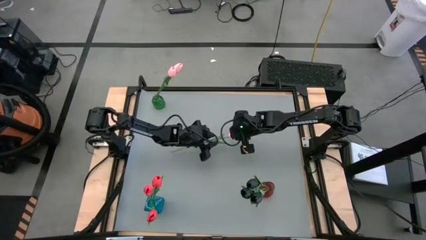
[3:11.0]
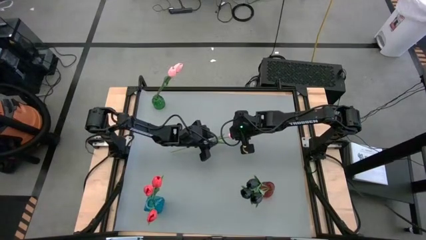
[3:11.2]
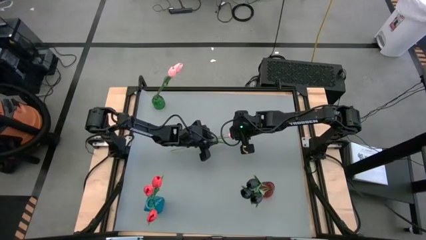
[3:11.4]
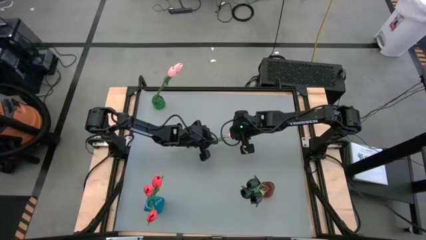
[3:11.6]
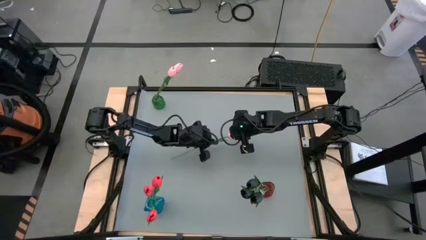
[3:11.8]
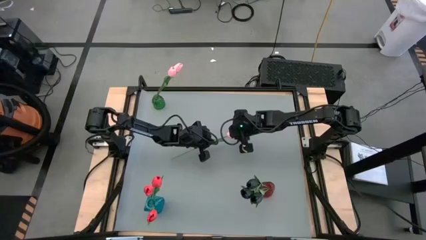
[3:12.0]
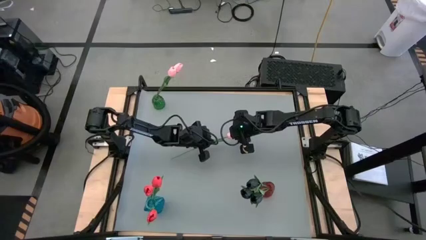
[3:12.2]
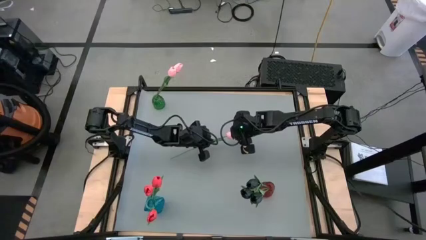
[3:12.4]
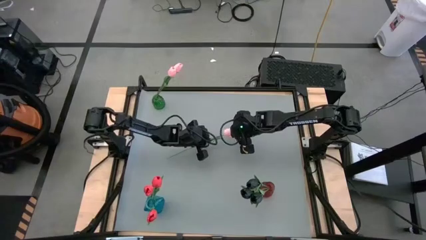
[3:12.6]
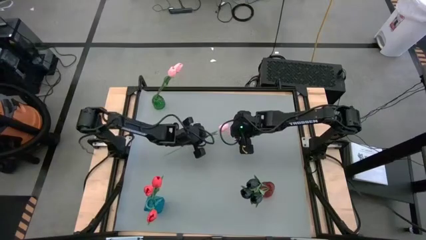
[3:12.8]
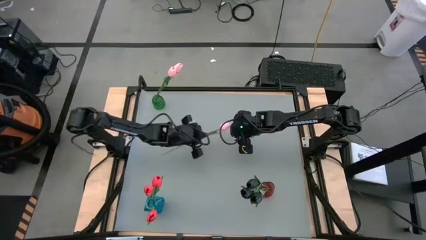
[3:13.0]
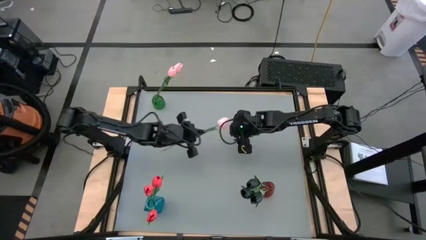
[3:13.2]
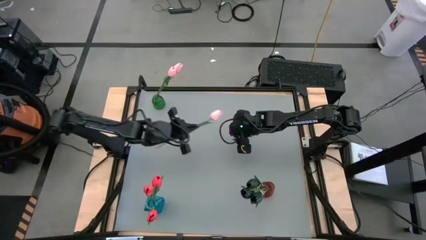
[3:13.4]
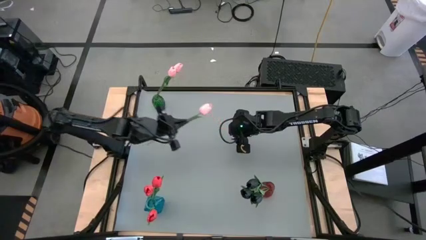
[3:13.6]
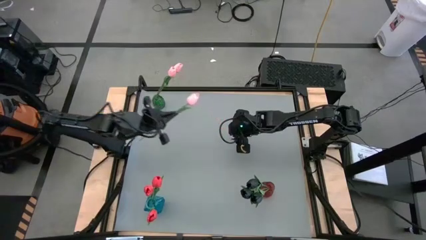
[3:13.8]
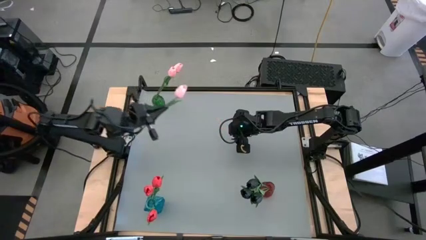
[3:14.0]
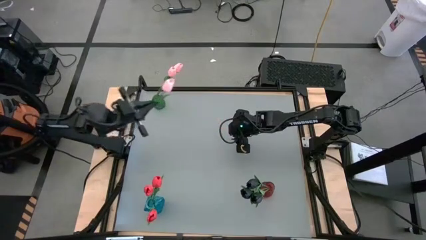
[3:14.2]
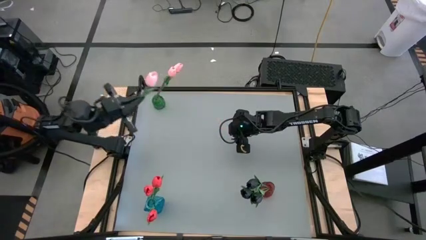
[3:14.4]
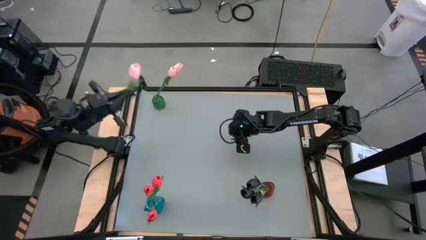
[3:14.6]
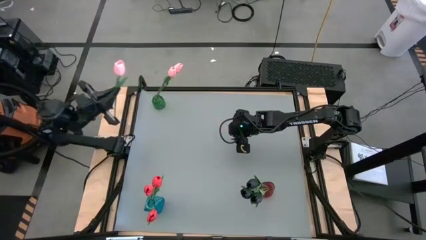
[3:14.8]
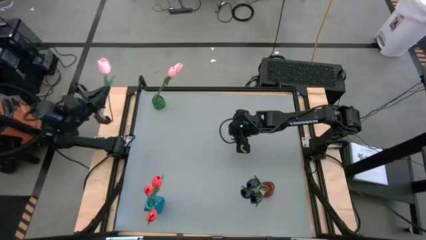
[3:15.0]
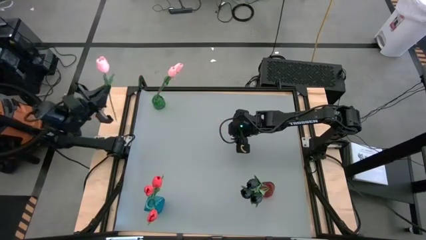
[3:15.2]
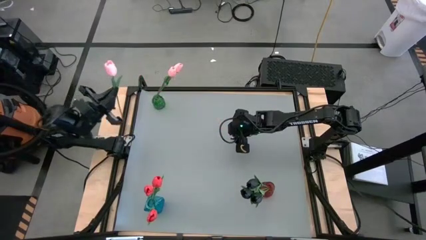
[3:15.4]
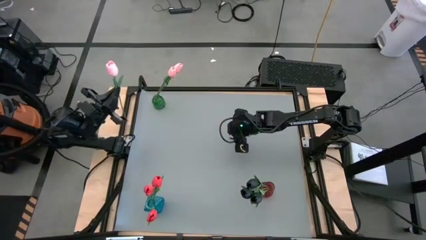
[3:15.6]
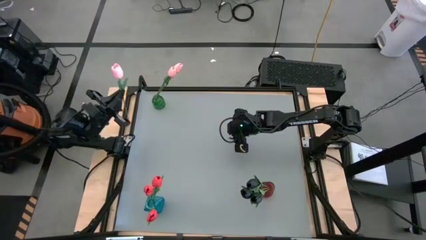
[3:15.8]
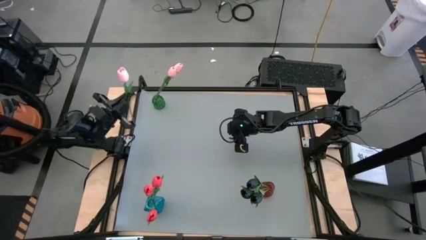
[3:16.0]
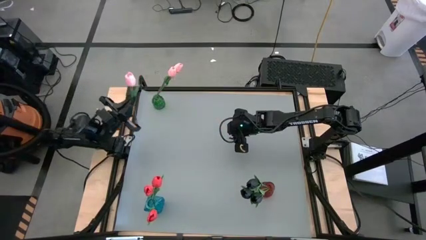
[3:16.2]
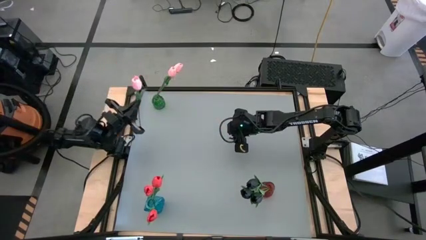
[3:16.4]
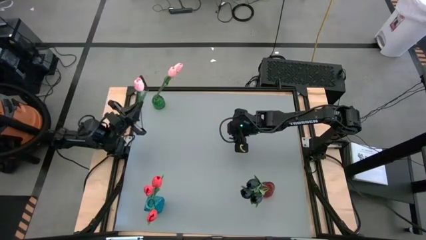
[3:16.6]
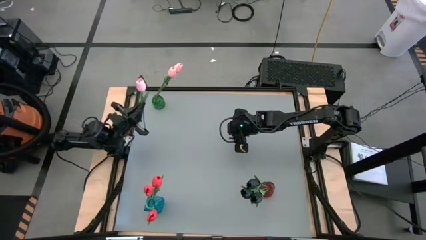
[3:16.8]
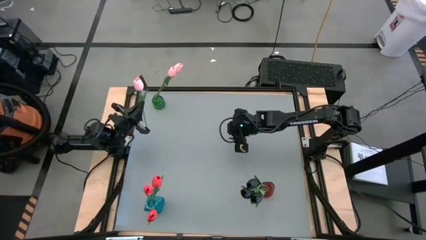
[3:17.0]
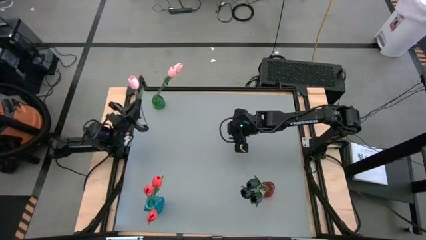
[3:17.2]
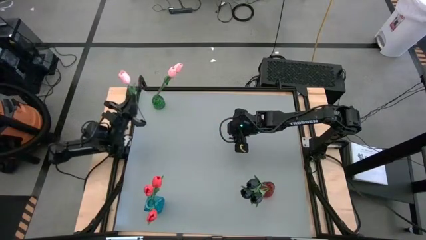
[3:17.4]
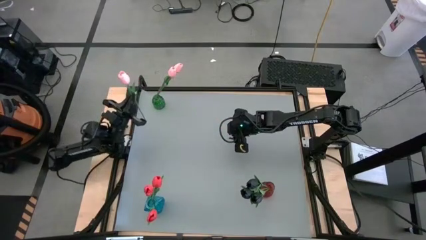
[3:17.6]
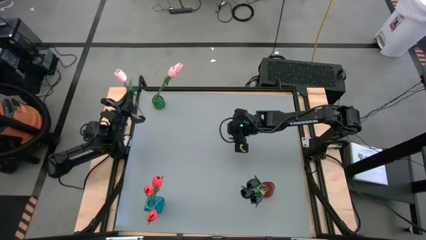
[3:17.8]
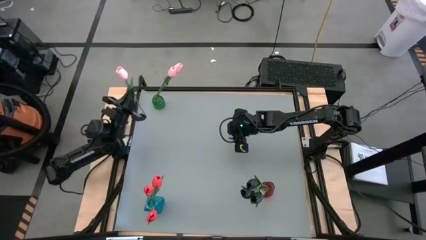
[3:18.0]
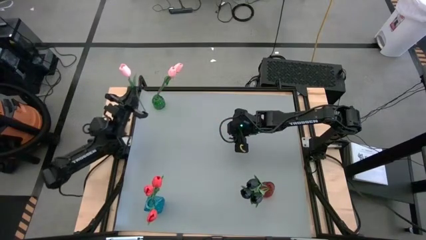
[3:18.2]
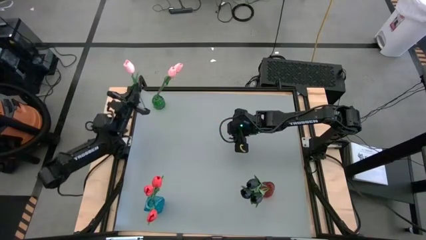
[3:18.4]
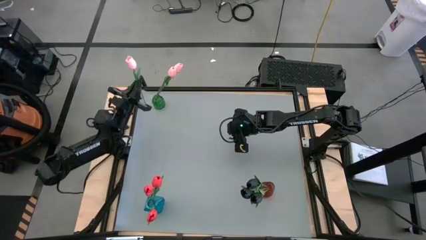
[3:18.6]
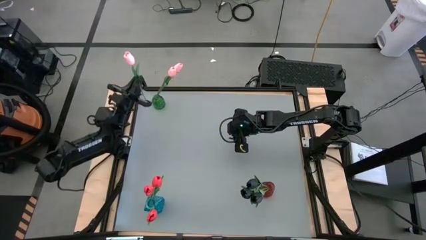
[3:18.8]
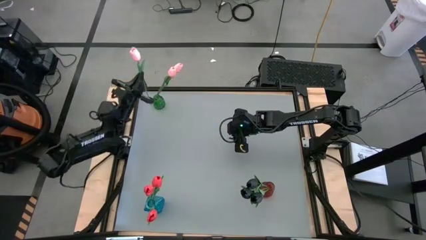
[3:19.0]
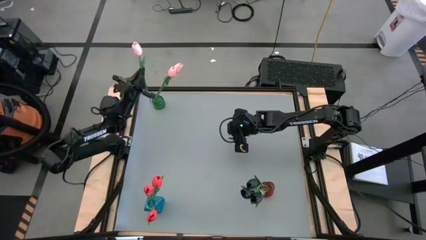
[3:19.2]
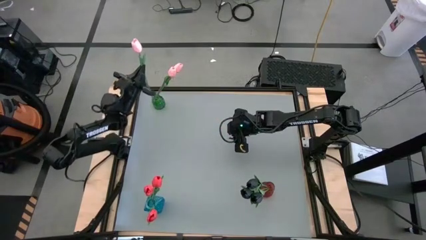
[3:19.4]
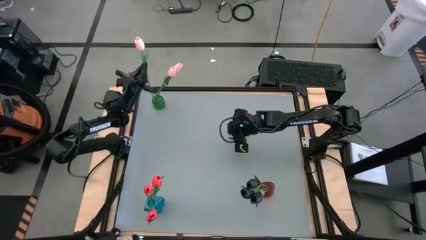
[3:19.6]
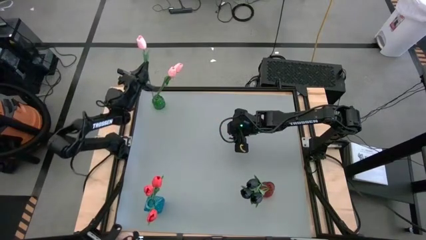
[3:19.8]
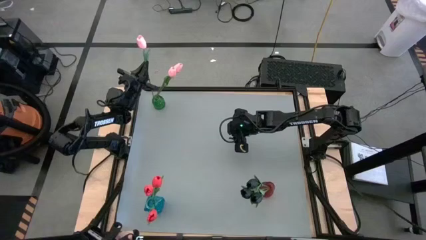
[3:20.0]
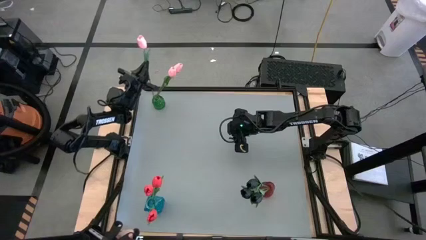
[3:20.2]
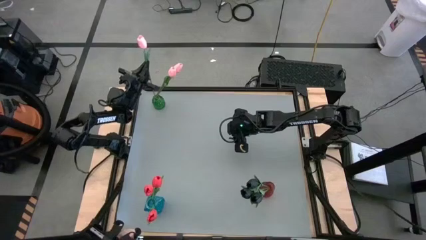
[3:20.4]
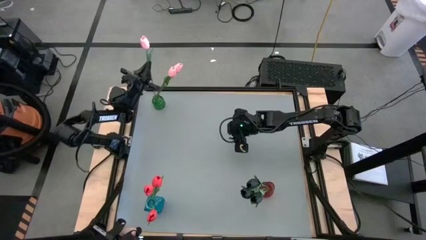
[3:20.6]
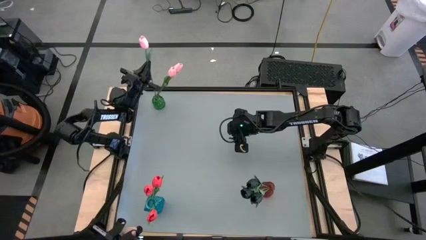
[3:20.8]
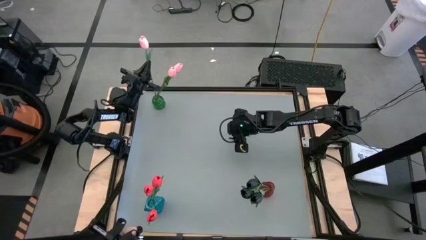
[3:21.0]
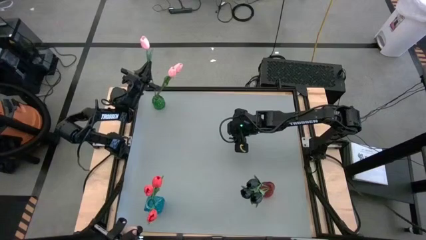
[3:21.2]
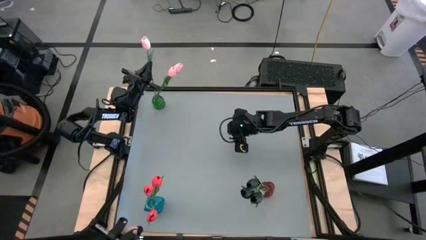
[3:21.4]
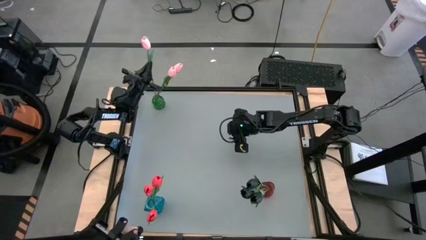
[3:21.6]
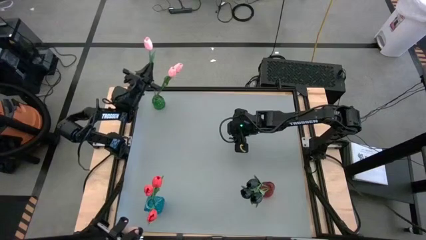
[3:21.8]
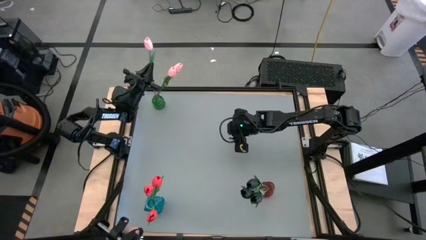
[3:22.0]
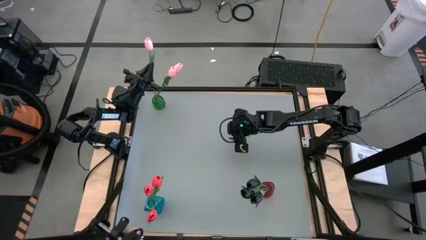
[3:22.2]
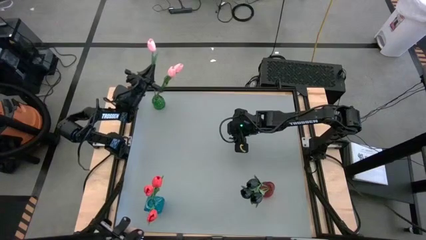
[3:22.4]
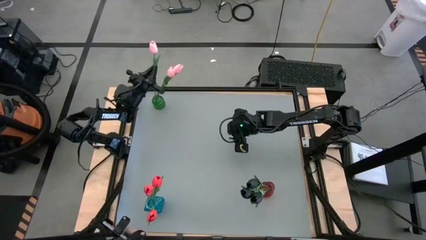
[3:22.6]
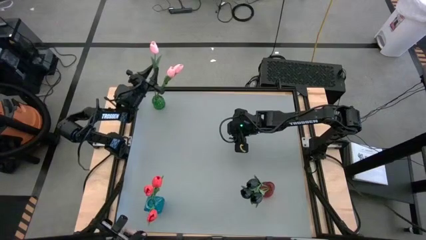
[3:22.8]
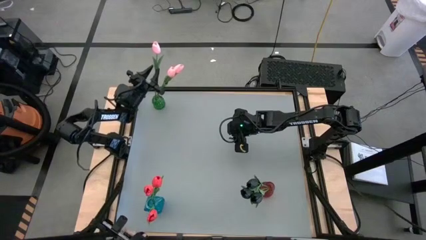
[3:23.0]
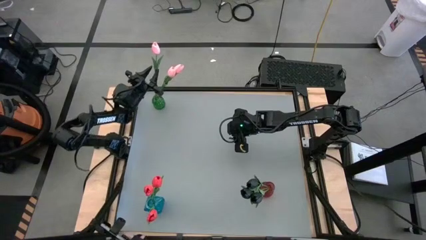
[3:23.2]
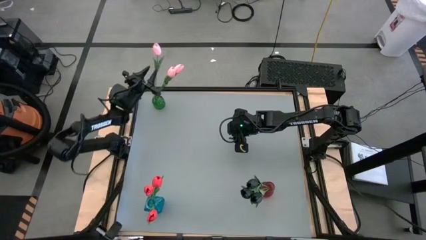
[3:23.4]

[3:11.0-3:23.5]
Task: Sort flowers into vase by color
Put the pink flower into the green vase
